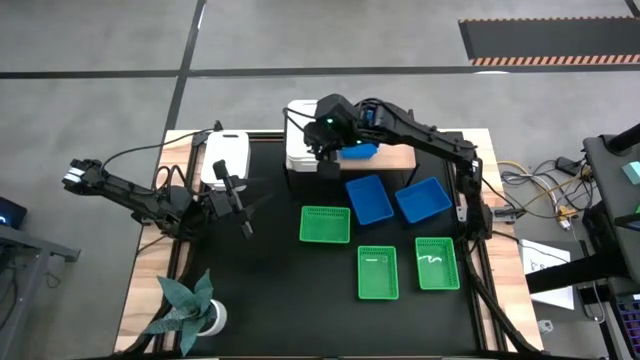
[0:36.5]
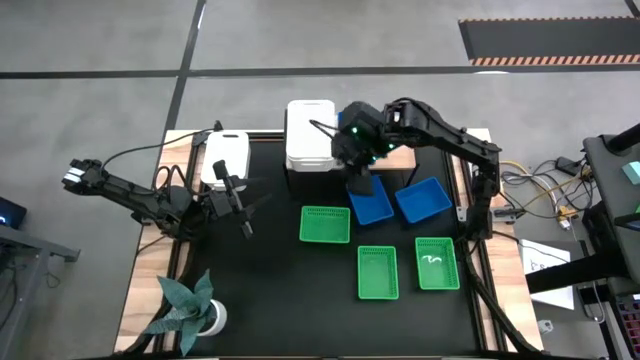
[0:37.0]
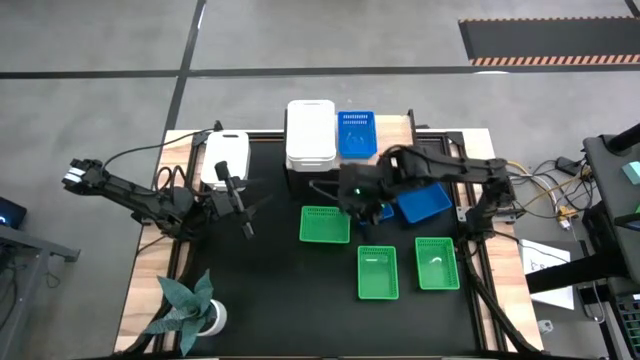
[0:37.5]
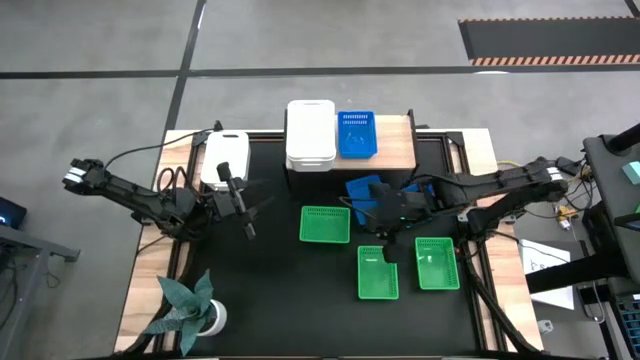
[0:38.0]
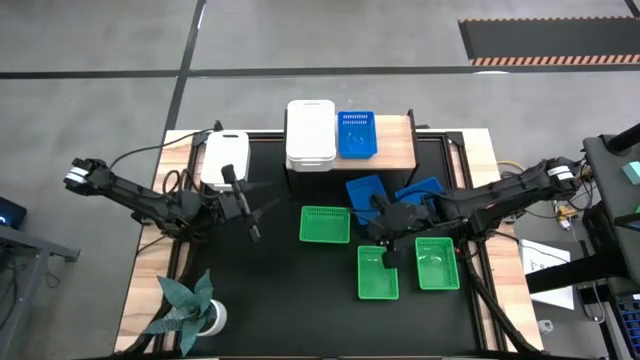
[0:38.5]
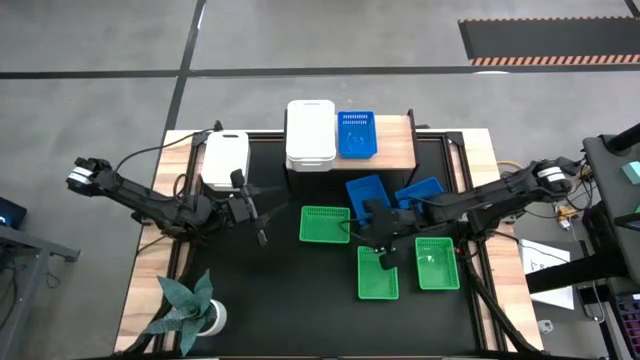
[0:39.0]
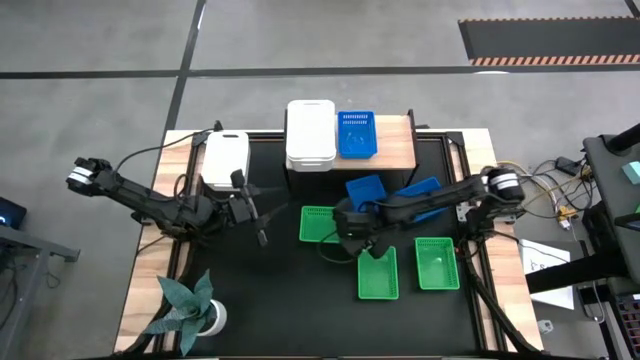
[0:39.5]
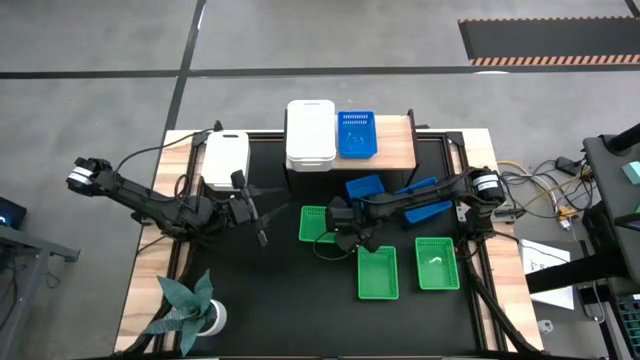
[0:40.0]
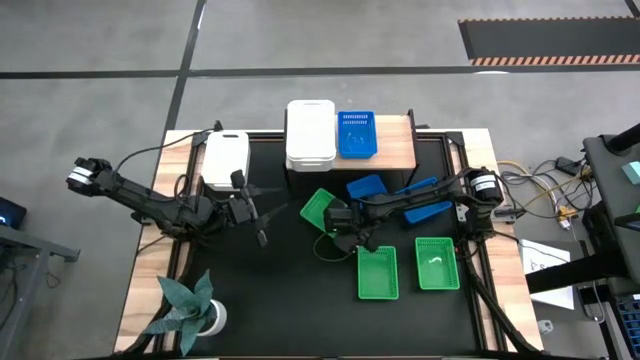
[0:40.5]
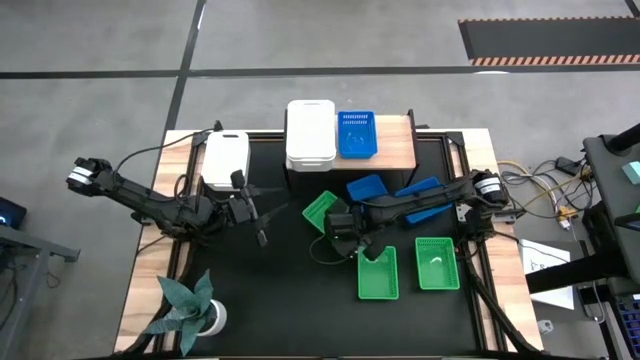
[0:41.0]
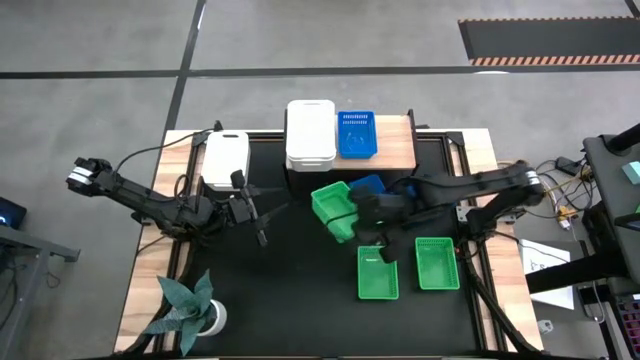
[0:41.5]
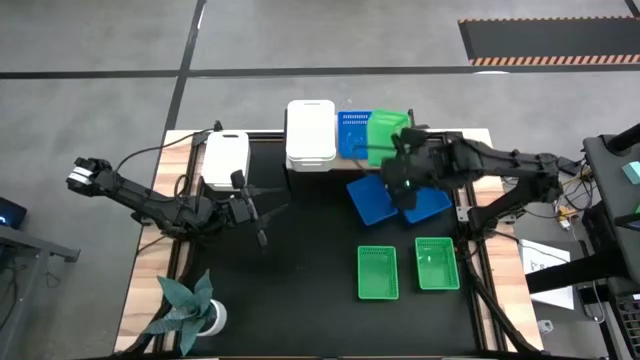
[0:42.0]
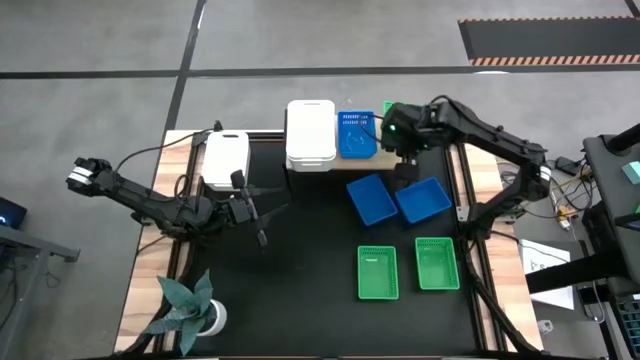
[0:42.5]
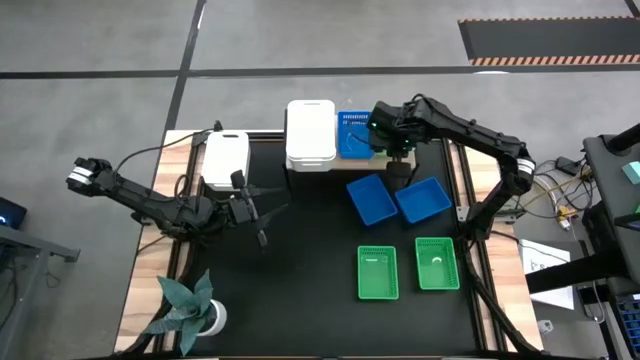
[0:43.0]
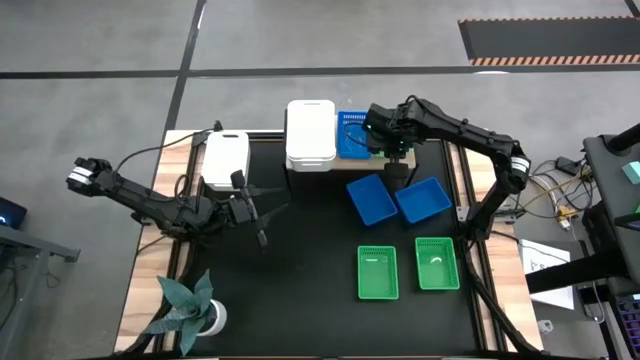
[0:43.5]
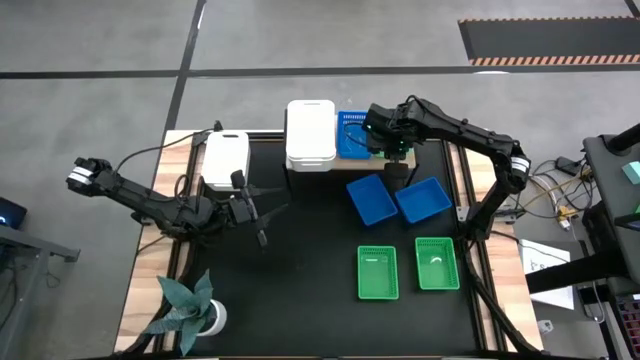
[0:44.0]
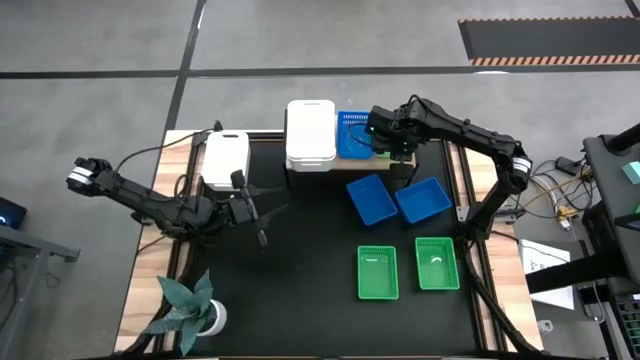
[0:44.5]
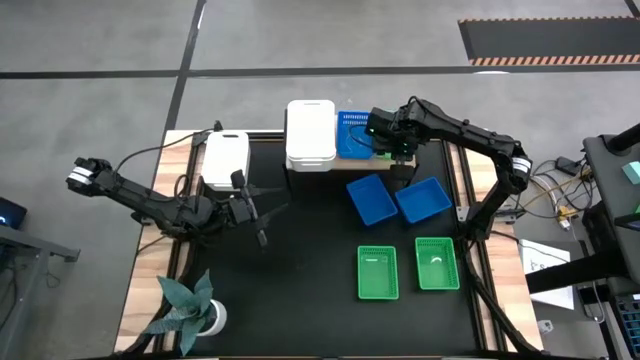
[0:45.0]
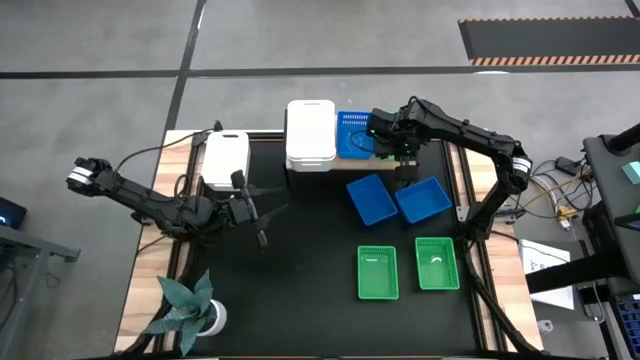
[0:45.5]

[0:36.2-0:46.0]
Task: Stack baskets on shelf by color
Put the left green bin on the shelf

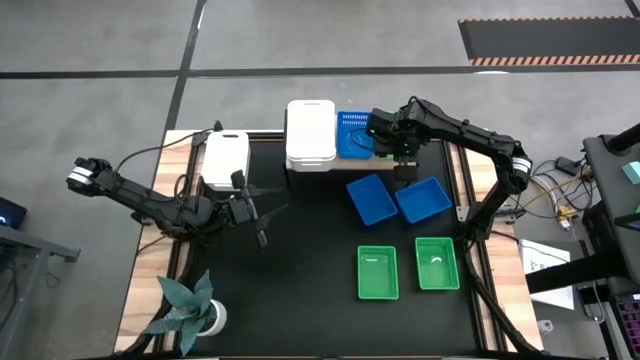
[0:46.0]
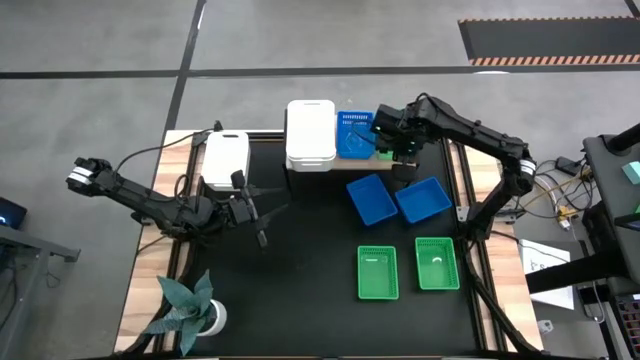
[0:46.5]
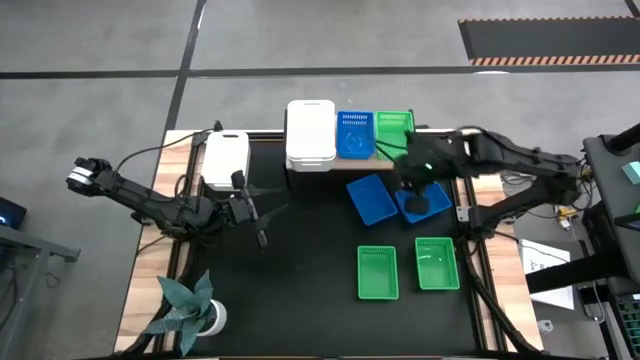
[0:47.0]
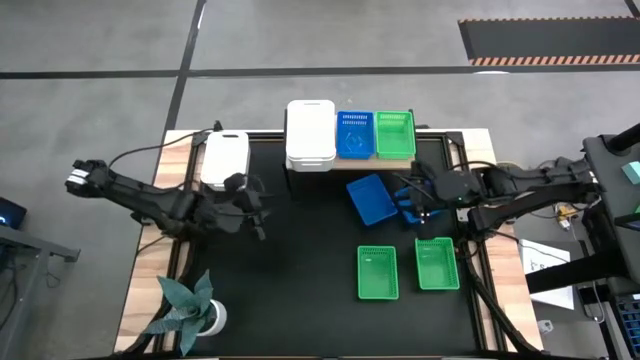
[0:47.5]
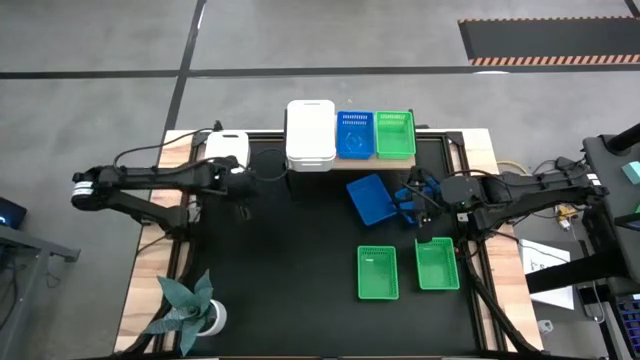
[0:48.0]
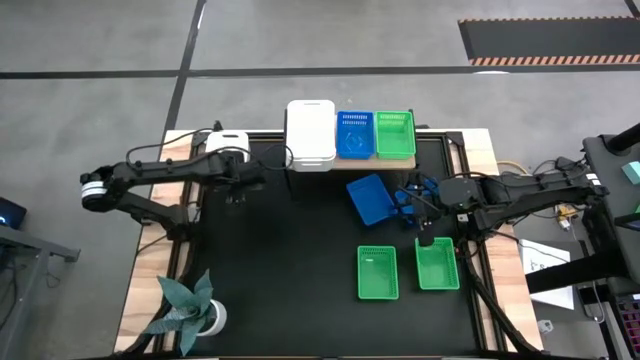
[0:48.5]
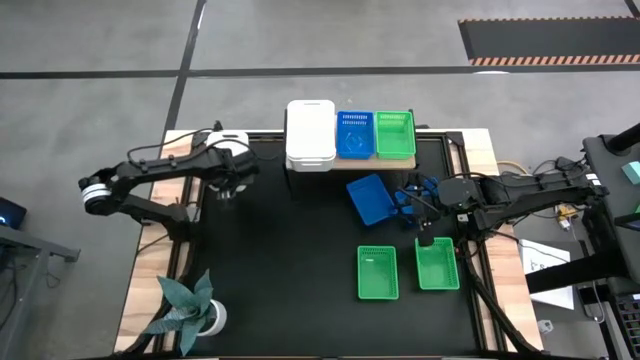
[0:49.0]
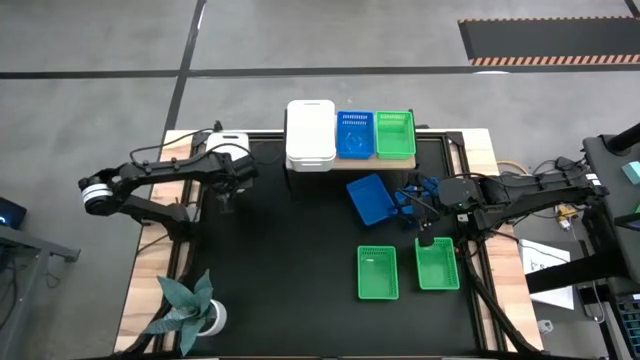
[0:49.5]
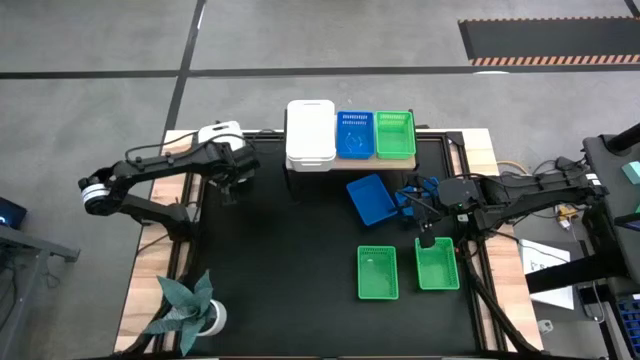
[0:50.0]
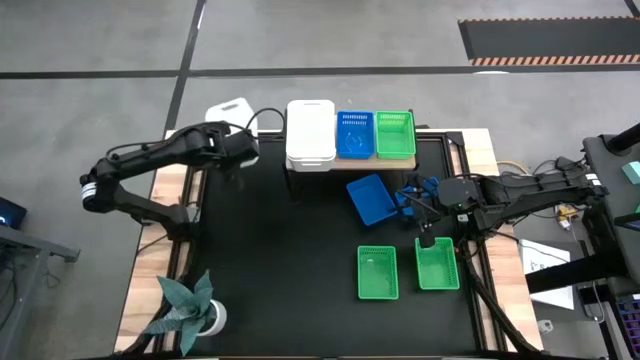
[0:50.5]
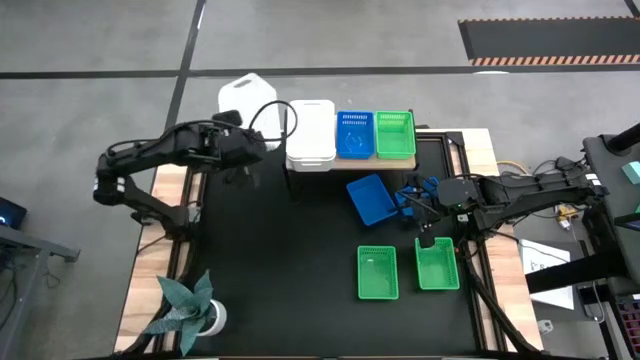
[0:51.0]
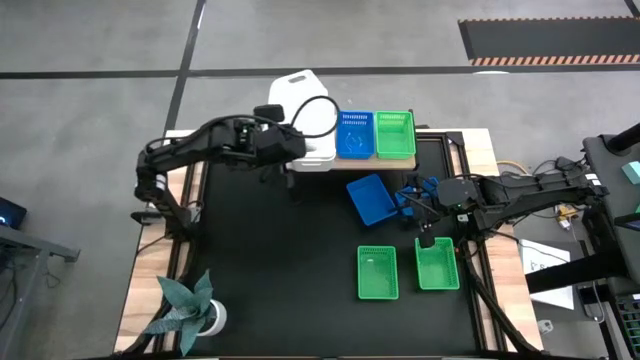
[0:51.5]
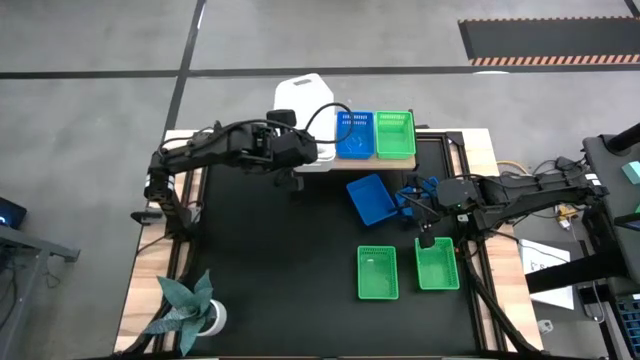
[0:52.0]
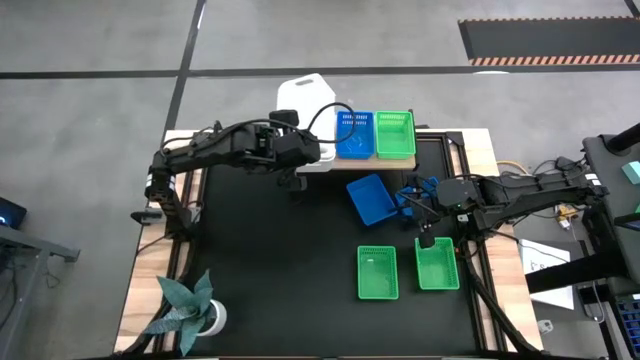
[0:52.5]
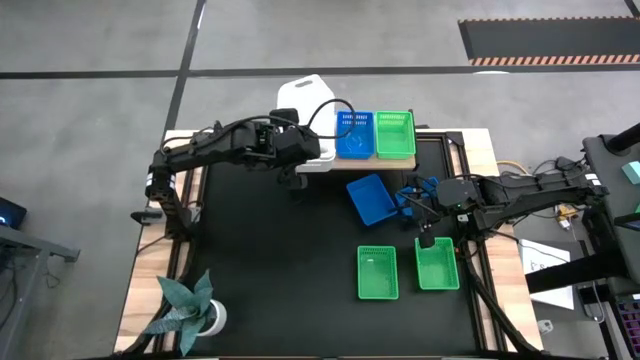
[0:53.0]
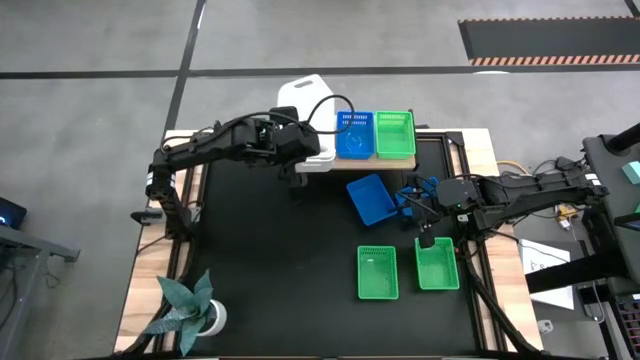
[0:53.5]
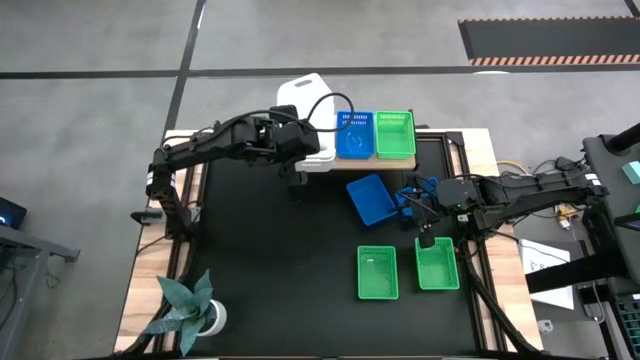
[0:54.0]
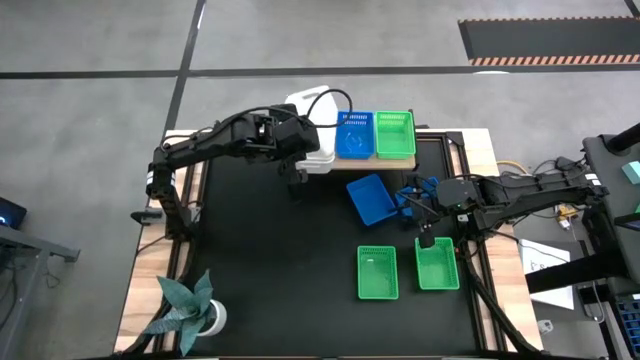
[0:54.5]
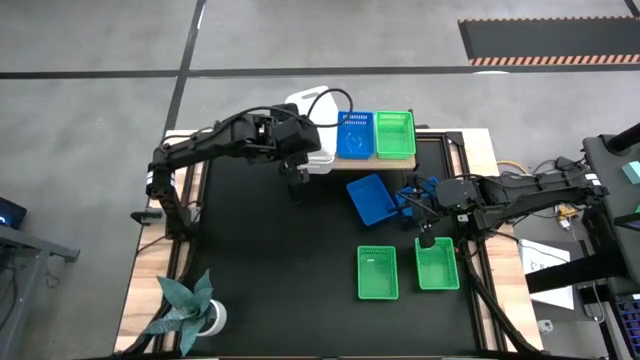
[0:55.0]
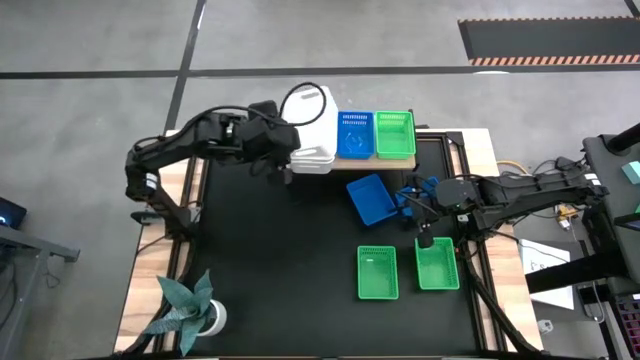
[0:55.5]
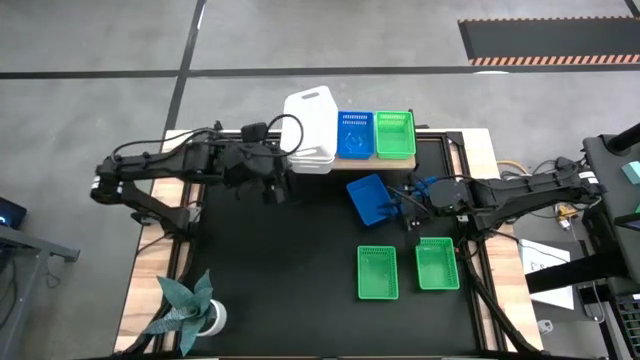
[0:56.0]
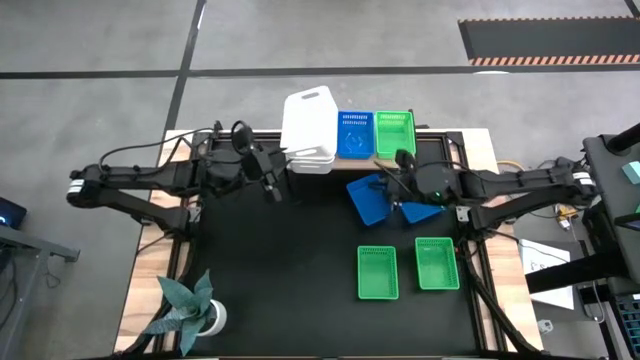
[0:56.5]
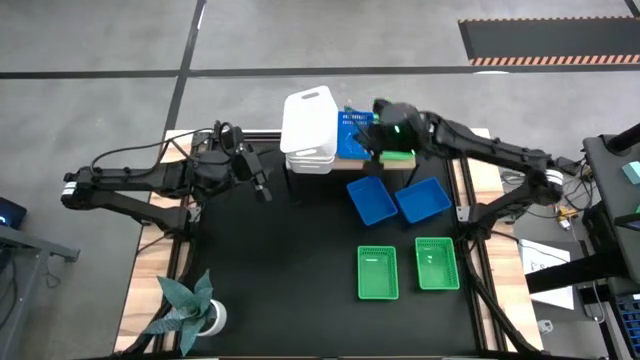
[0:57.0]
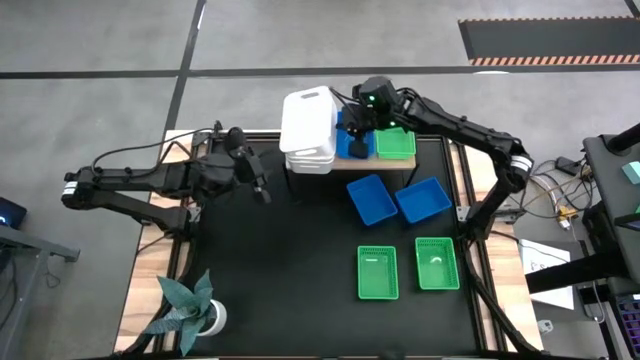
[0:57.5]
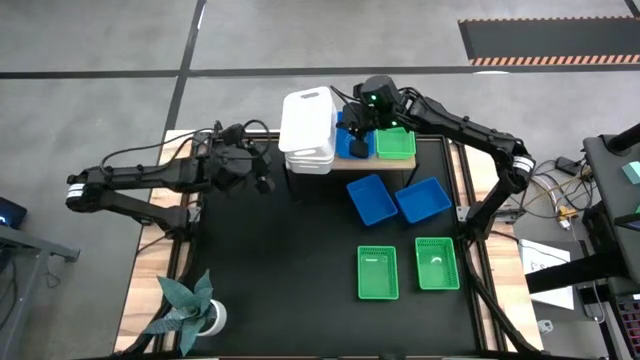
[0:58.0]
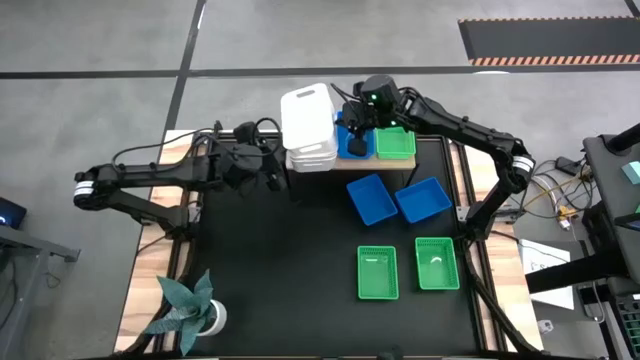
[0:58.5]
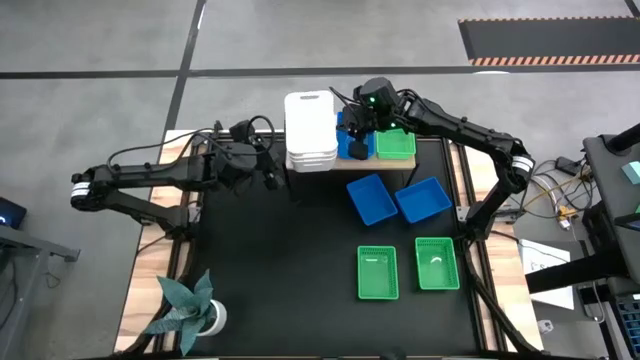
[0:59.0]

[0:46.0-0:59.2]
Stack the white bin on top of the white bin on the shelf
